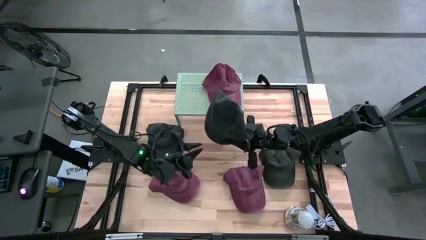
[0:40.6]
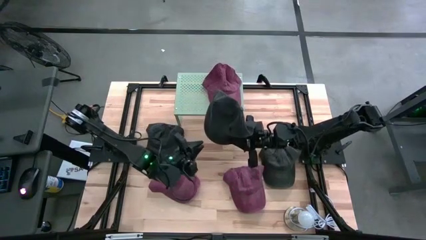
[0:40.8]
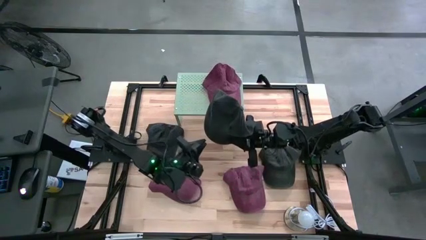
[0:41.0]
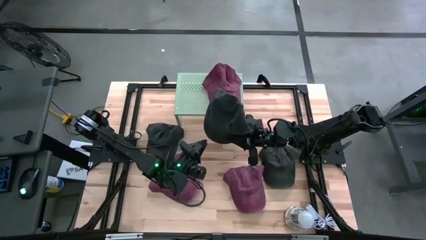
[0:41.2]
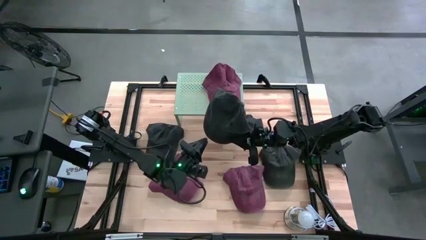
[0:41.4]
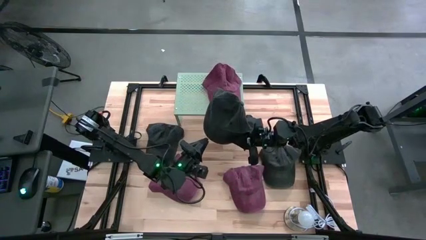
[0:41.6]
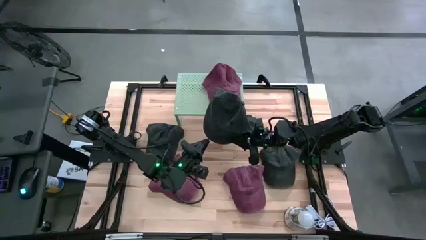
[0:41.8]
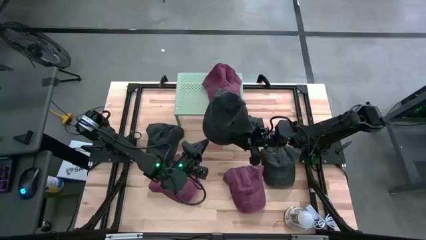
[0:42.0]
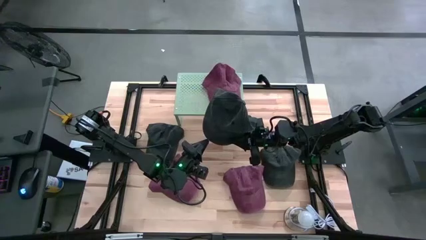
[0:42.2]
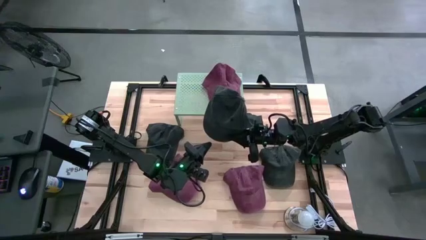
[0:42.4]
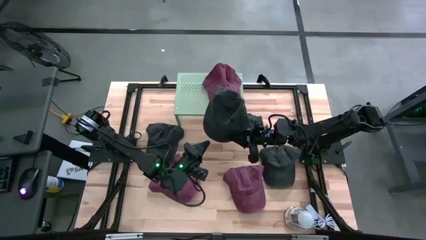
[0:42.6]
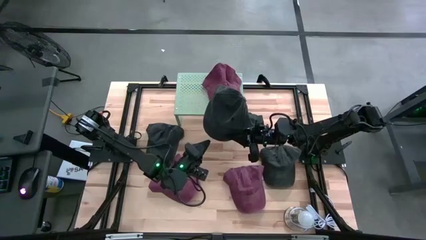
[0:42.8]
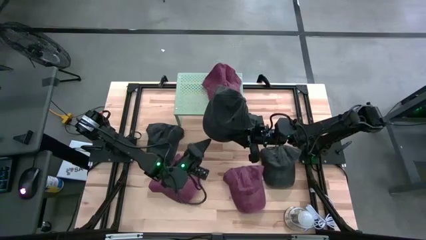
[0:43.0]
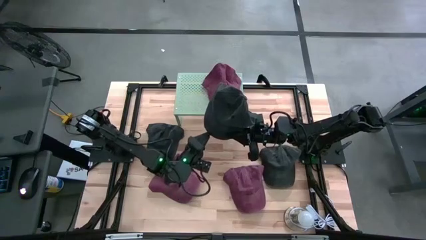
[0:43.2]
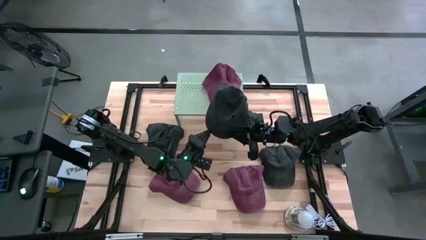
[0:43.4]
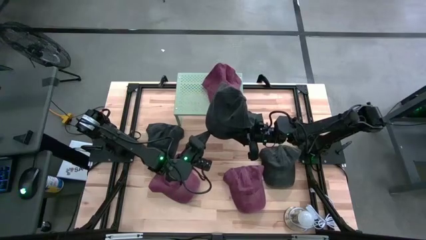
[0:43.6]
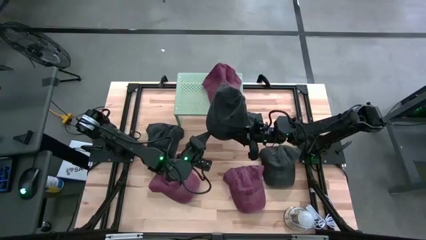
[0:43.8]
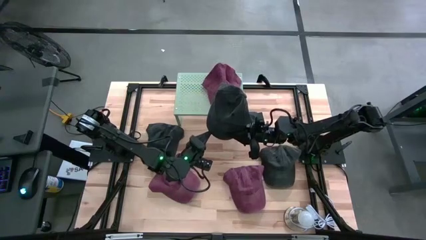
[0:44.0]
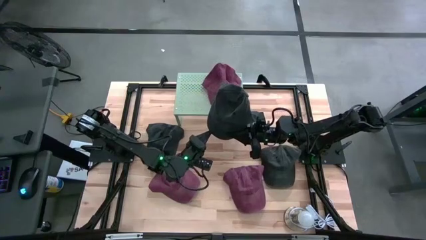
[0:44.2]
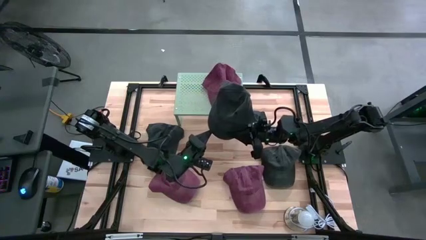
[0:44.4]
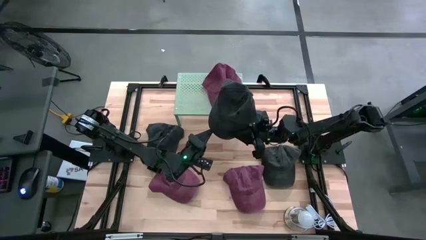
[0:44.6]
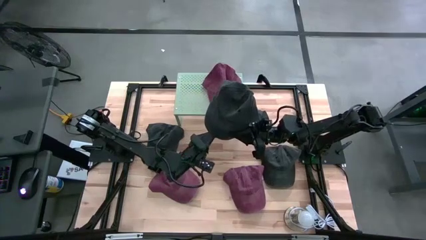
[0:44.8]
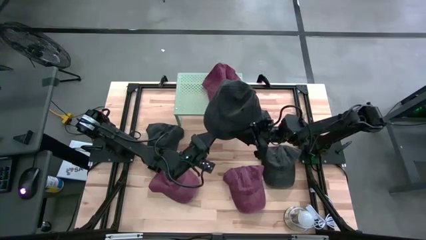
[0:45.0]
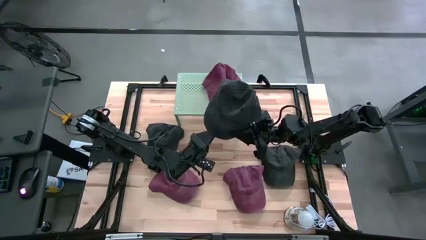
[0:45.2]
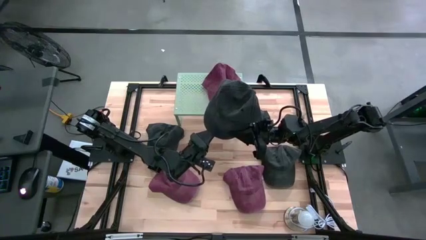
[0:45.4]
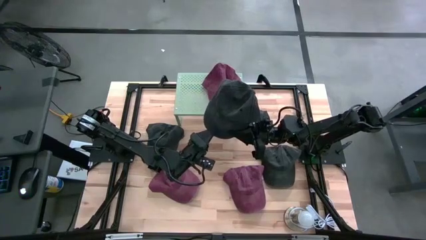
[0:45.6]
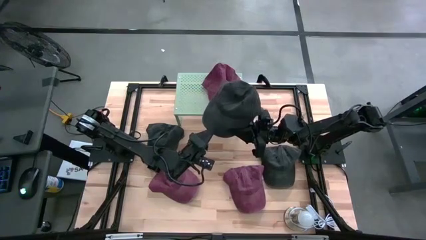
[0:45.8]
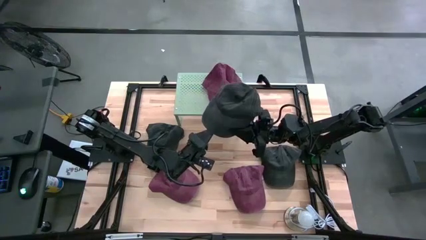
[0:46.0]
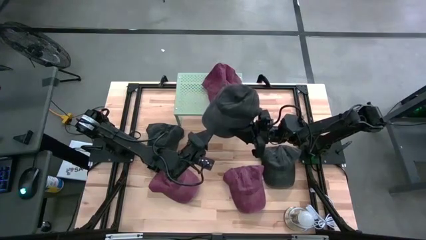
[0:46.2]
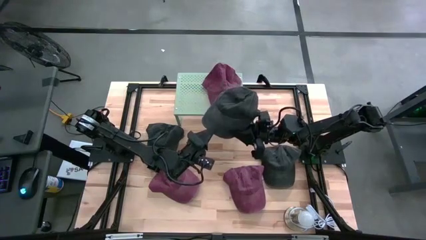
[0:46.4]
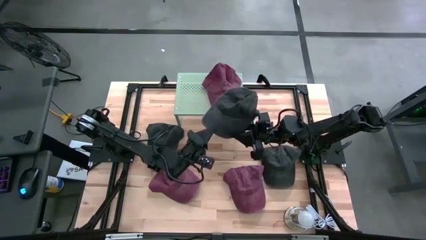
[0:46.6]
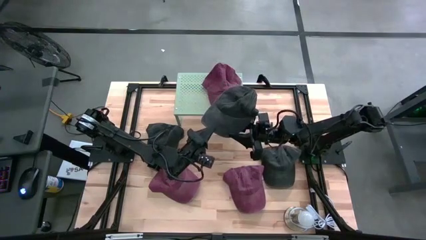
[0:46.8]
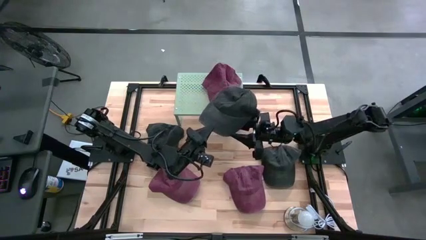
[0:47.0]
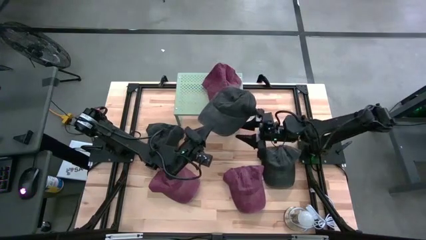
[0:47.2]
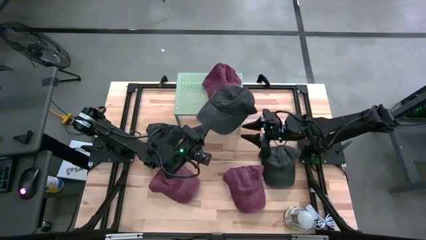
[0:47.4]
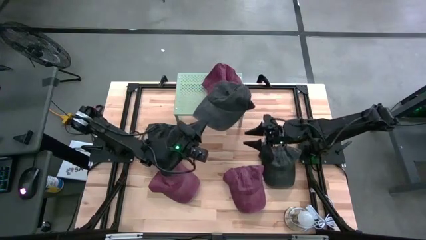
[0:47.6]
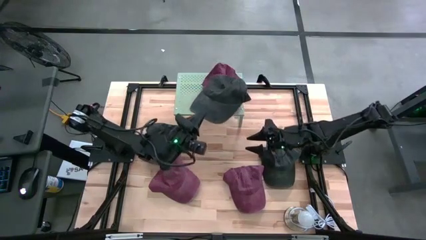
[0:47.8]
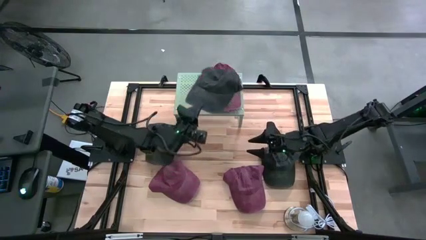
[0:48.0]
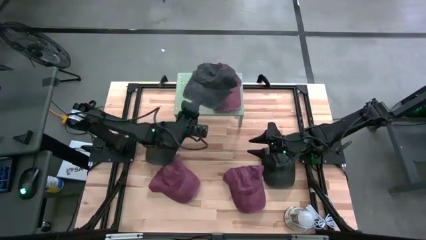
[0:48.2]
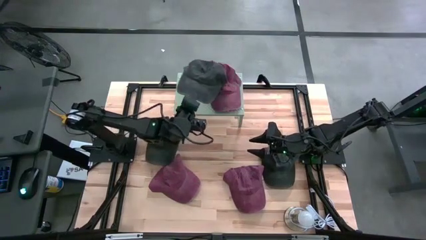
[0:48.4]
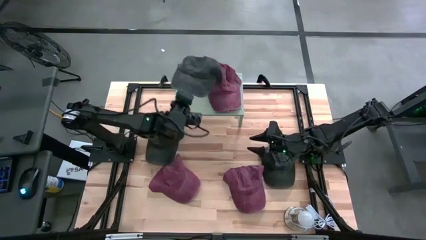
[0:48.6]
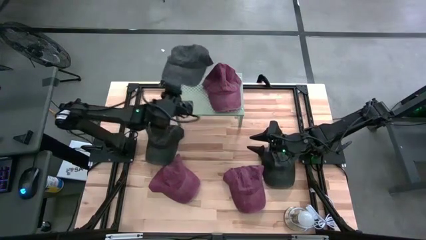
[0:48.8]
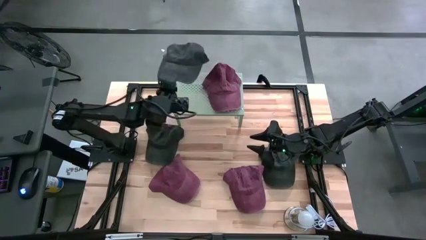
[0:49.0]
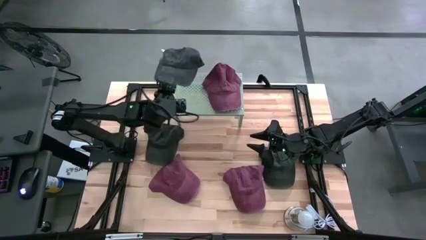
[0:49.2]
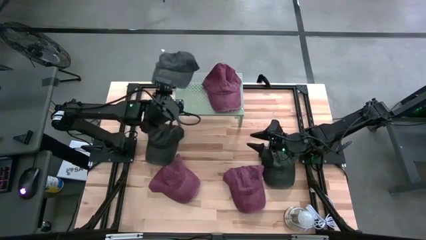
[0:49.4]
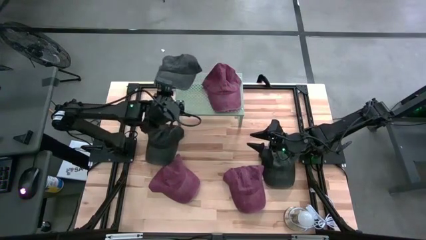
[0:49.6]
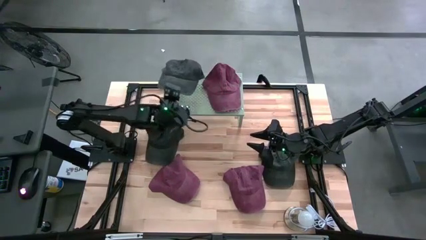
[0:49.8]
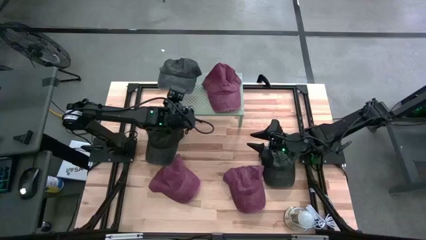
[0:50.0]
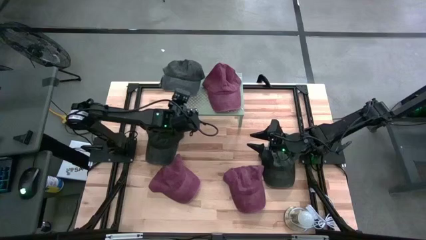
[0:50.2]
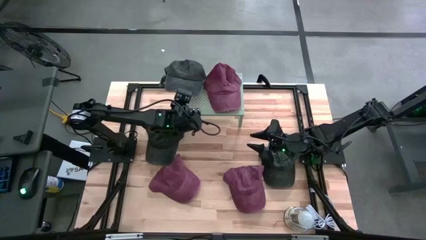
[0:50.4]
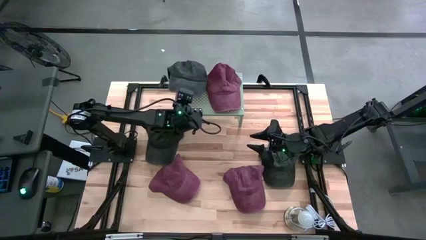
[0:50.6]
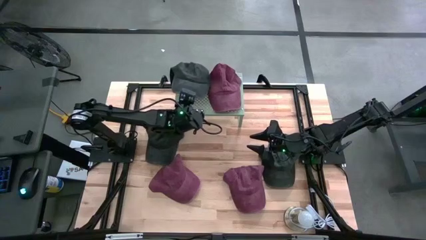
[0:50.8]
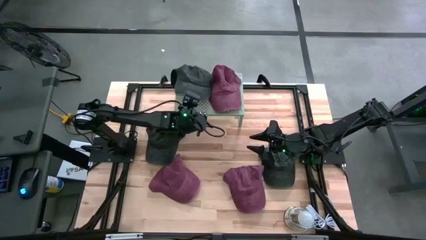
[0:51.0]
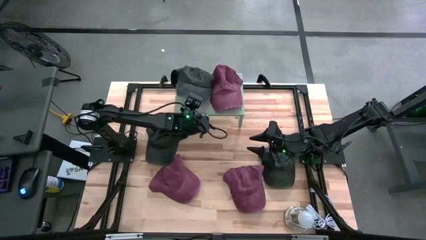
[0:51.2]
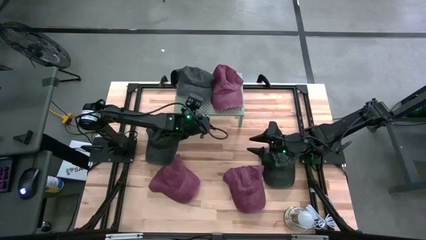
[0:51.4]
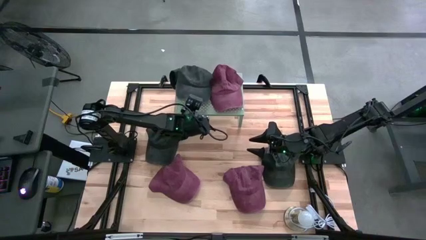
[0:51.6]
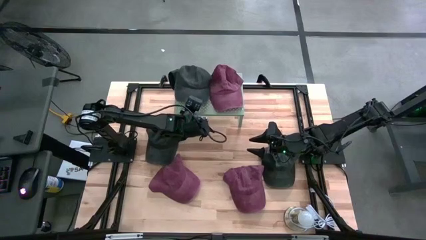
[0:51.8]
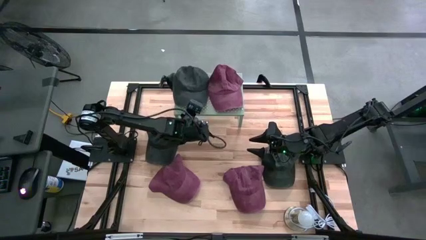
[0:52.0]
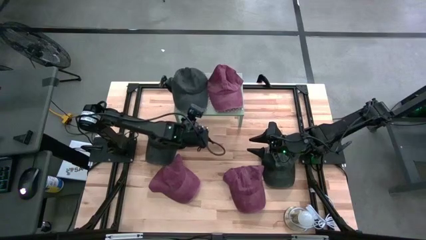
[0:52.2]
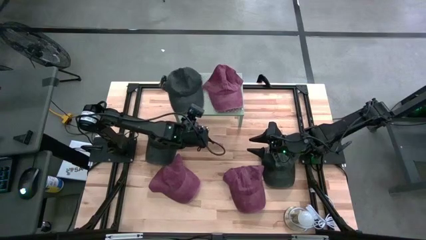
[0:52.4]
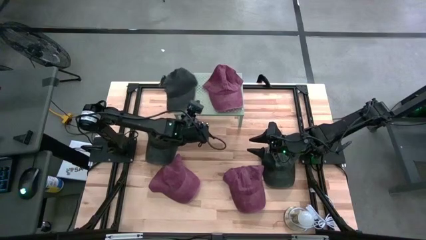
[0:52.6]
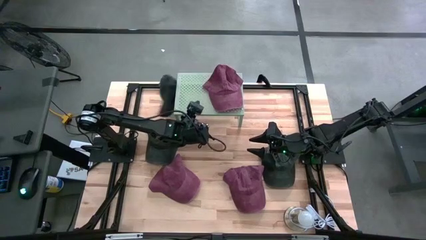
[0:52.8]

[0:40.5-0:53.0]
Task: Pick & Place hat
Put the center black cap on the left side of shelf

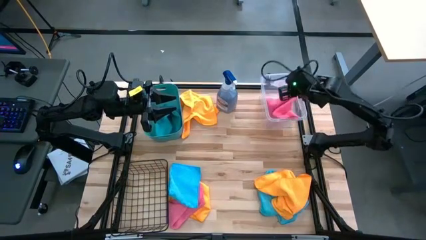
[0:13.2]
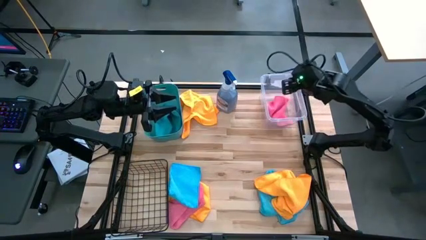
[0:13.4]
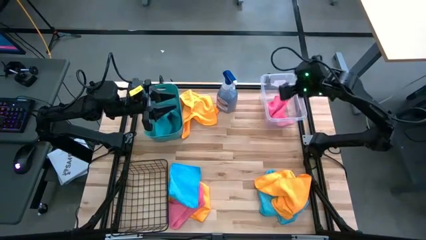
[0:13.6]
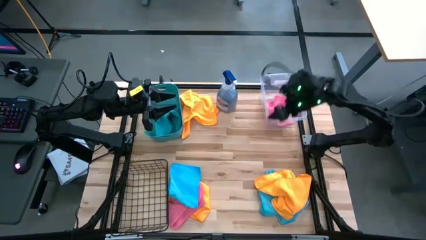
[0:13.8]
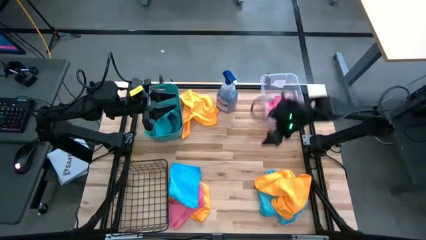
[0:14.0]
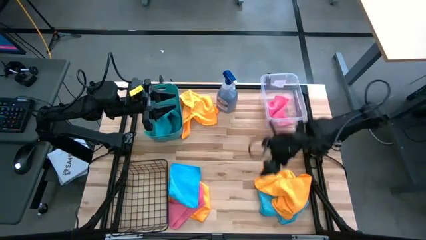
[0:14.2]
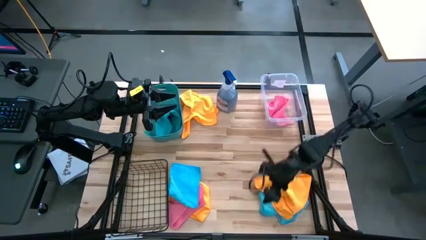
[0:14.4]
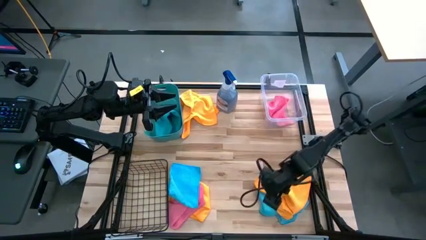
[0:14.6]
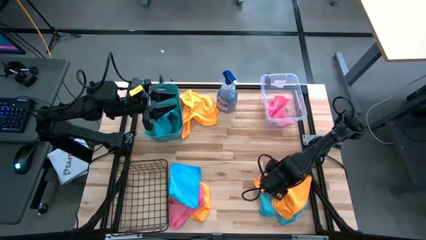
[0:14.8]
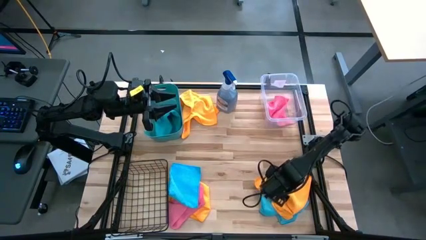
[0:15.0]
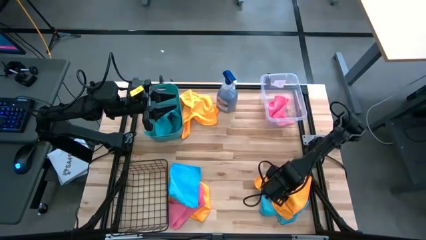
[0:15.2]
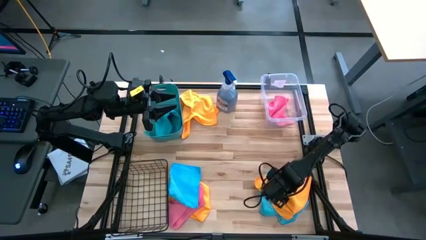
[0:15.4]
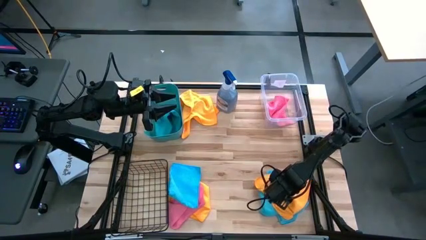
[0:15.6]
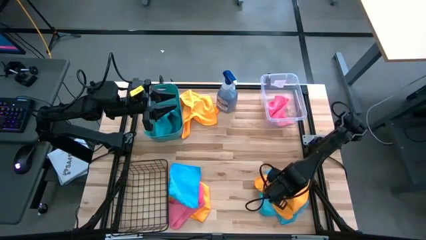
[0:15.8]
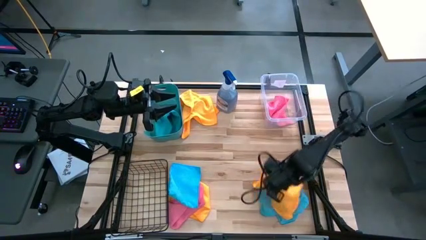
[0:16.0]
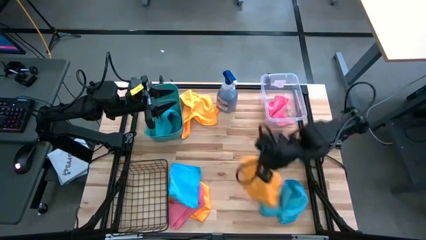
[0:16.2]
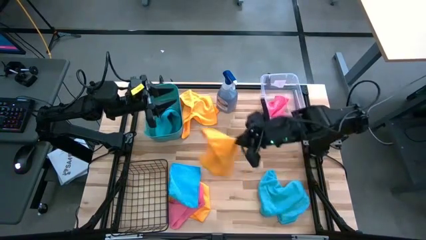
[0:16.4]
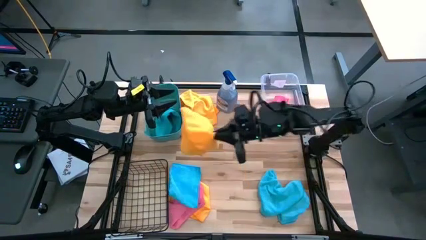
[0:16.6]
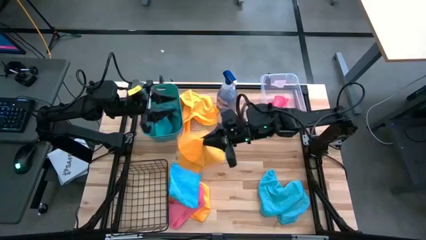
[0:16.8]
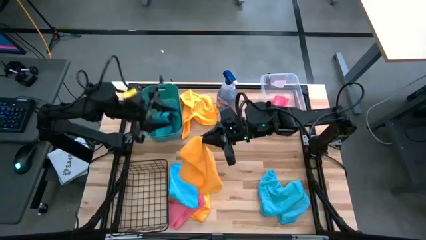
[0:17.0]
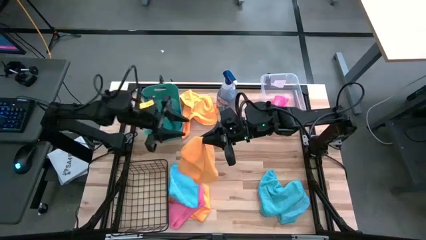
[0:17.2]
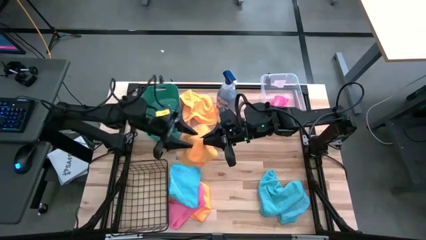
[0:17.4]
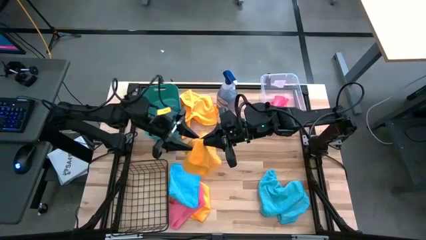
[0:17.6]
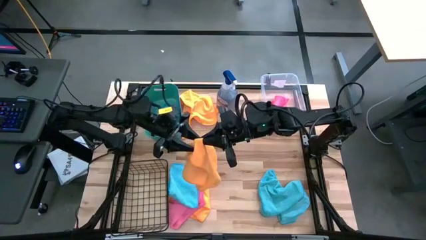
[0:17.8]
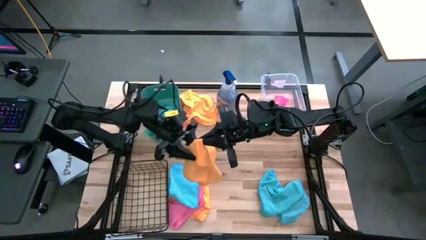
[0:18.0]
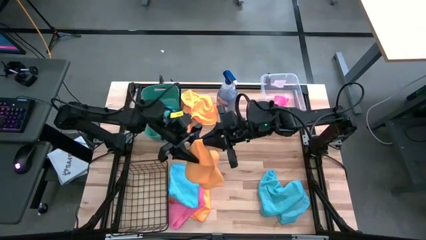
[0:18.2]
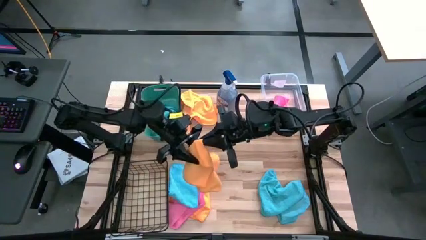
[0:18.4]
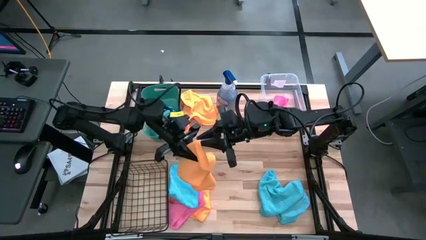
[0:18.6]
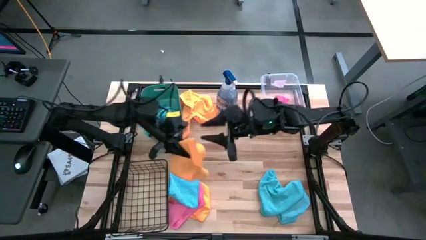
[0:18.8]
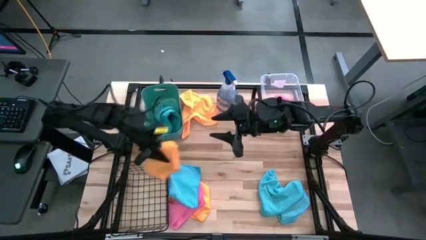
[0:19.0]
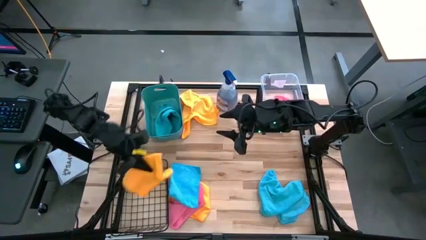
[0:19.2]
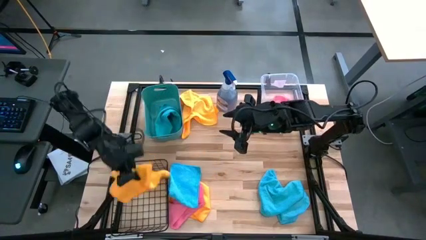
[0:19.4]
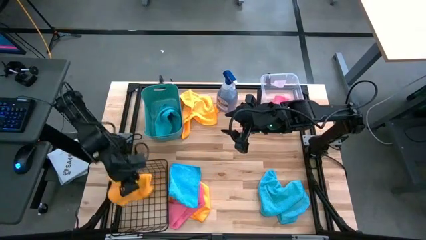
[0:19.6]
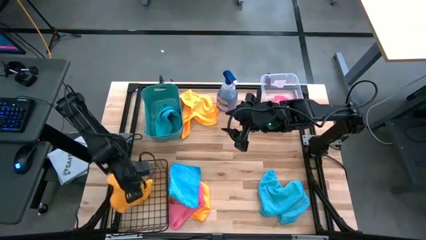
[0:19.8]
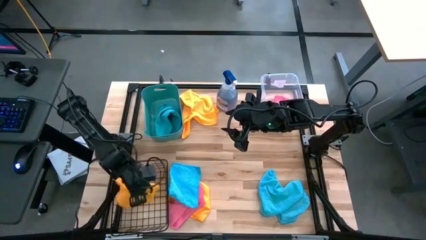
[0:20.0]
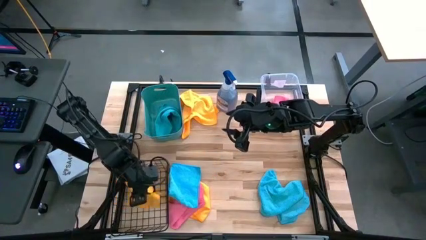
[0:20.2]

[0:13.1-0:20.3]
Task: Sort microfiber towel by color & place in baskets
Put the bottom right yellow towel in the basket
